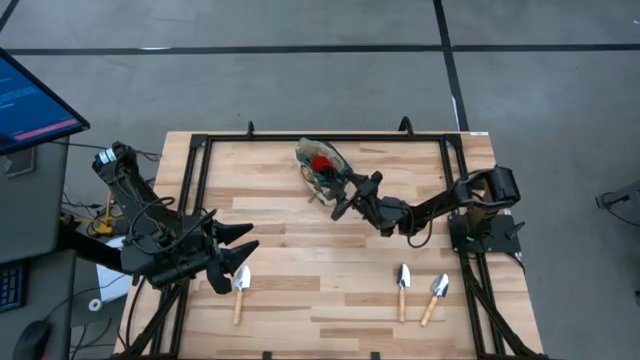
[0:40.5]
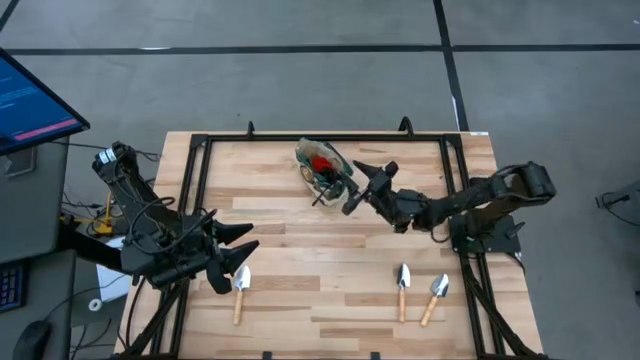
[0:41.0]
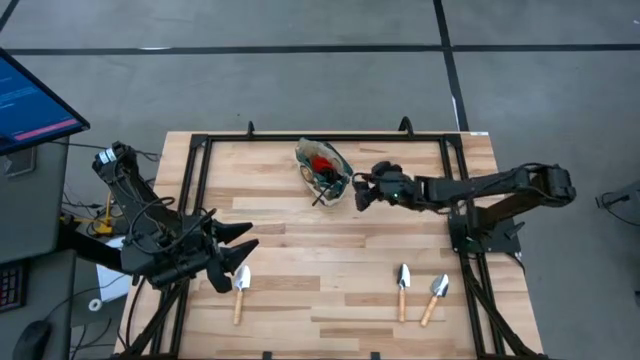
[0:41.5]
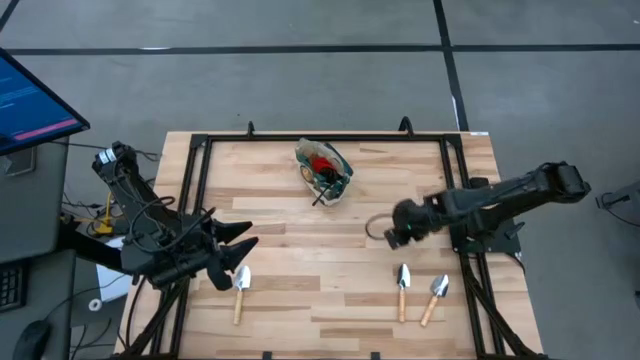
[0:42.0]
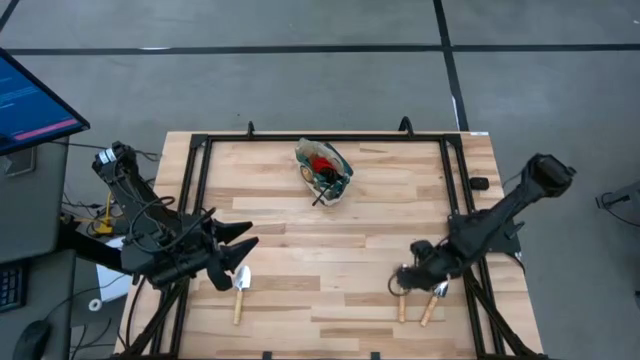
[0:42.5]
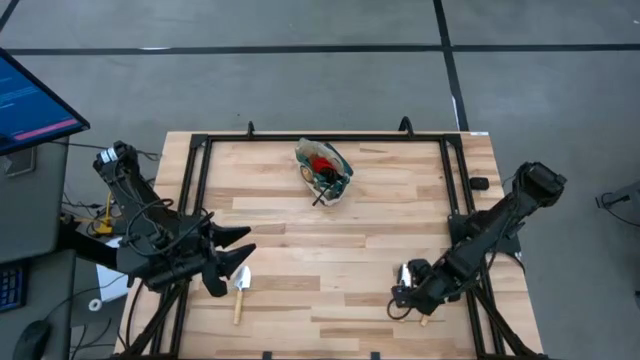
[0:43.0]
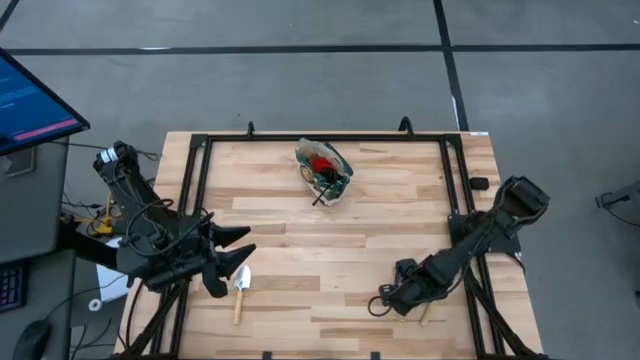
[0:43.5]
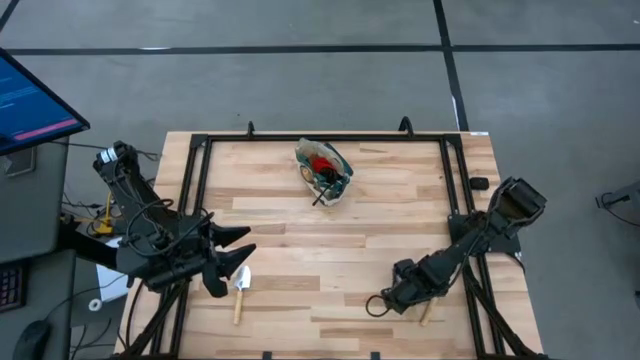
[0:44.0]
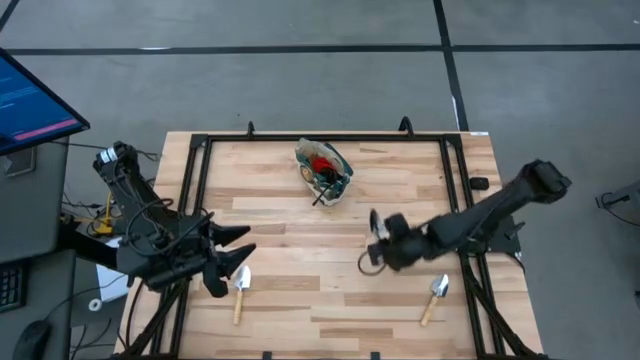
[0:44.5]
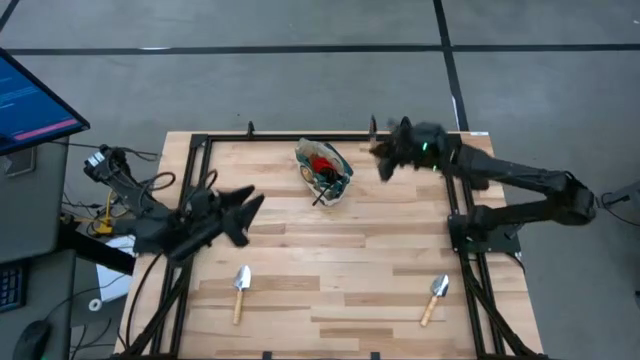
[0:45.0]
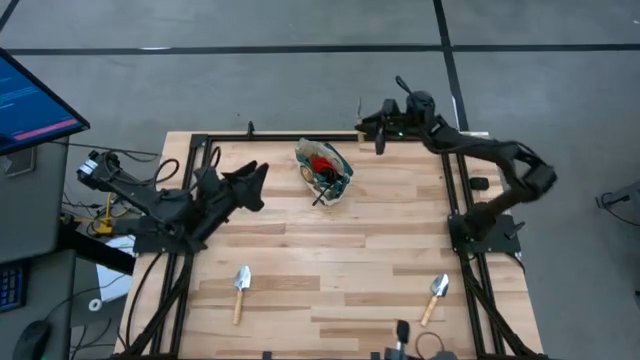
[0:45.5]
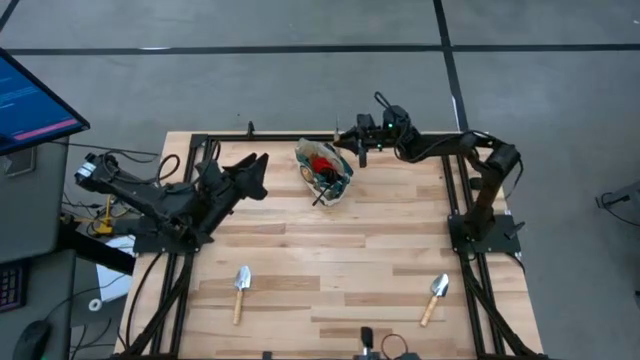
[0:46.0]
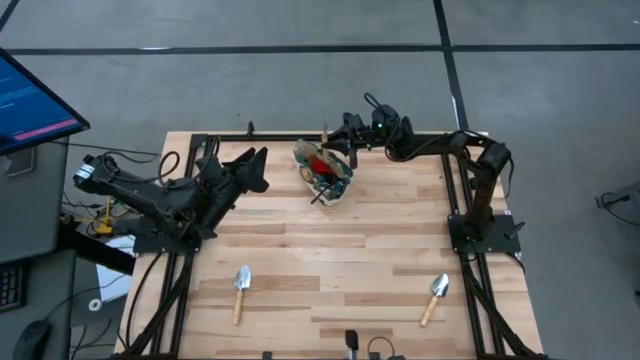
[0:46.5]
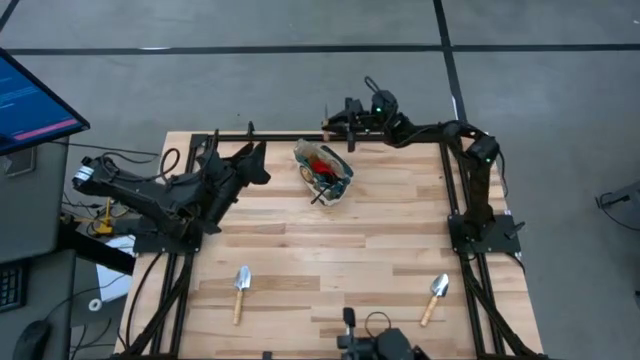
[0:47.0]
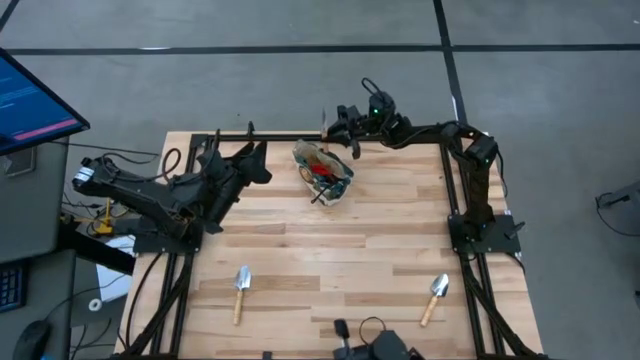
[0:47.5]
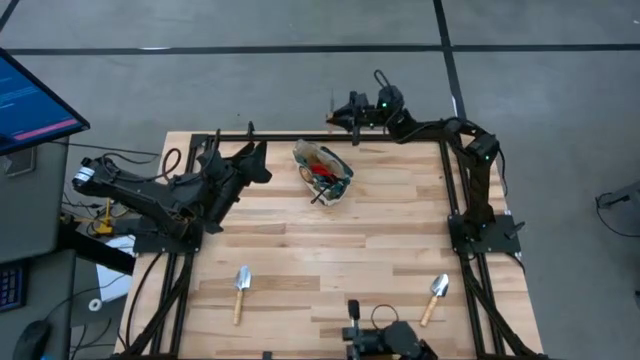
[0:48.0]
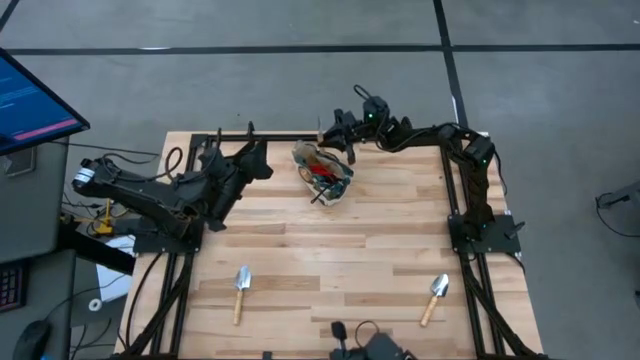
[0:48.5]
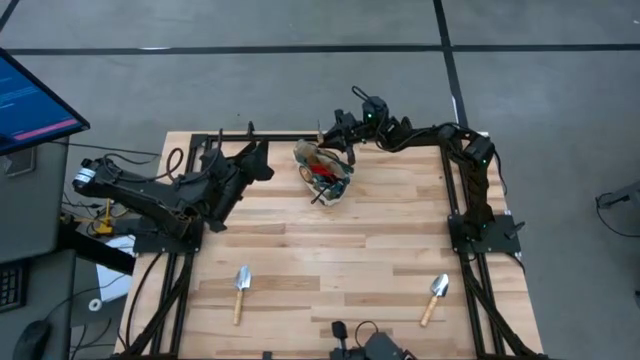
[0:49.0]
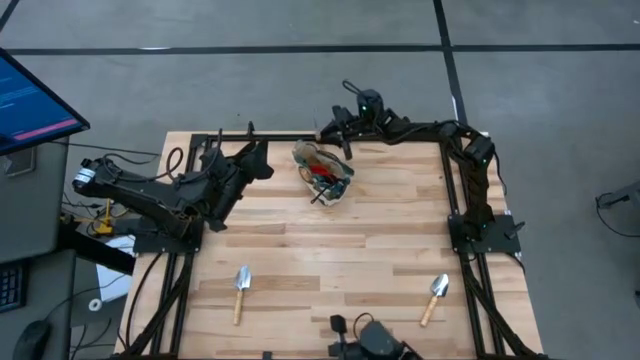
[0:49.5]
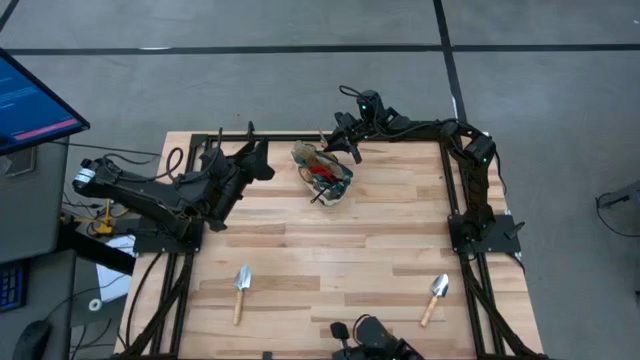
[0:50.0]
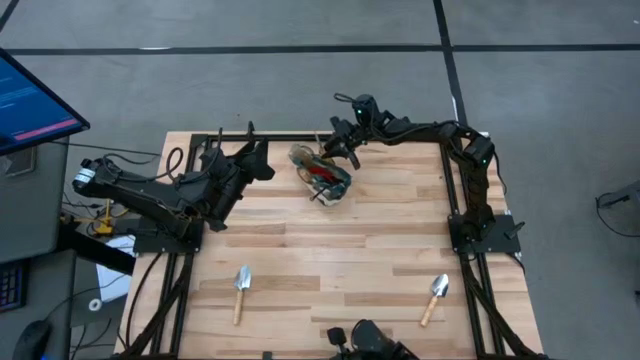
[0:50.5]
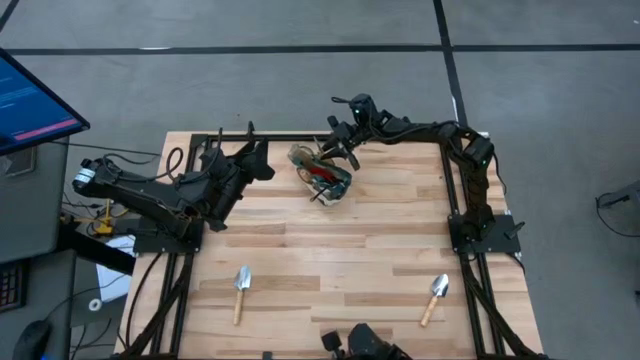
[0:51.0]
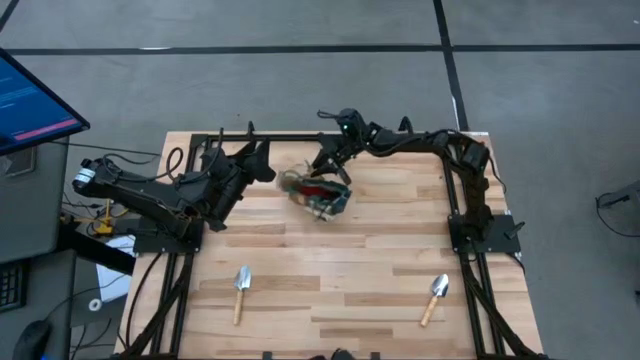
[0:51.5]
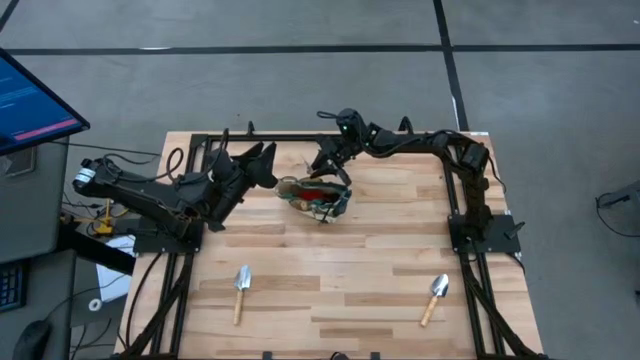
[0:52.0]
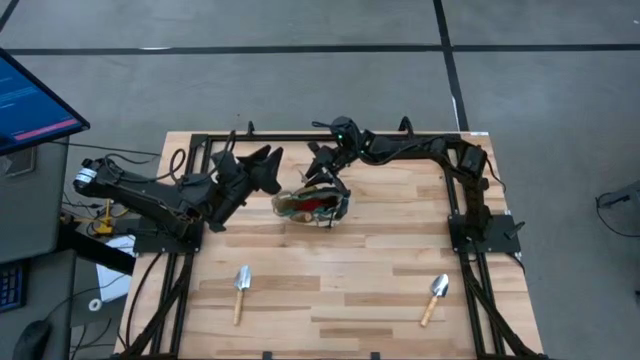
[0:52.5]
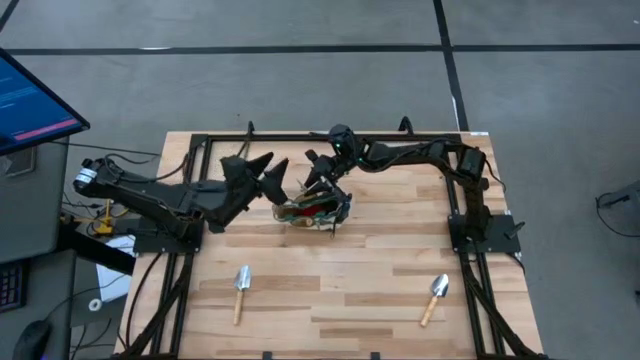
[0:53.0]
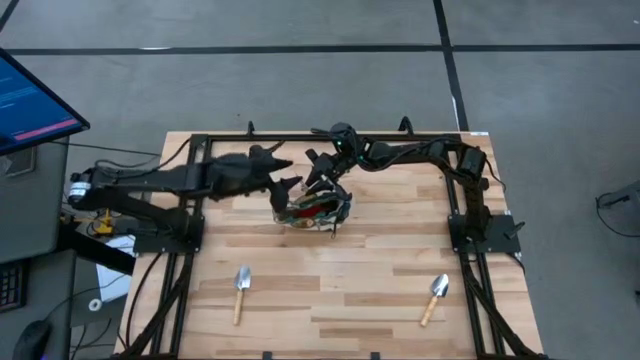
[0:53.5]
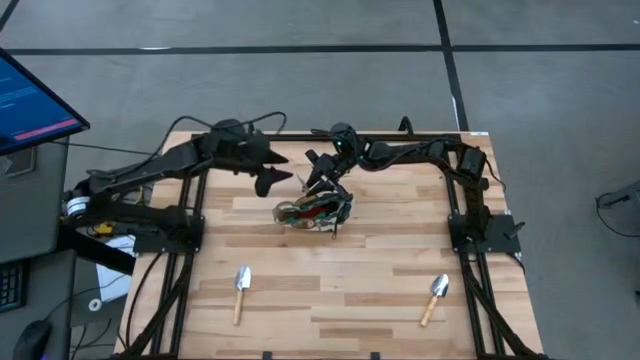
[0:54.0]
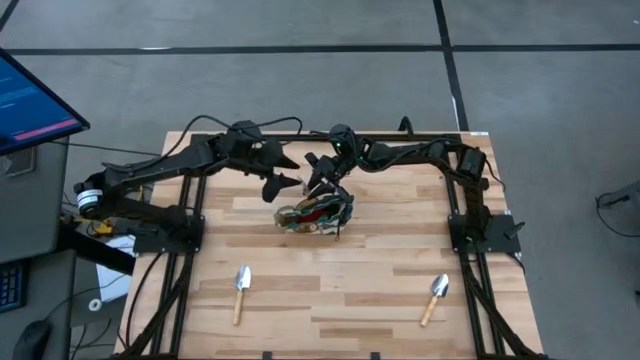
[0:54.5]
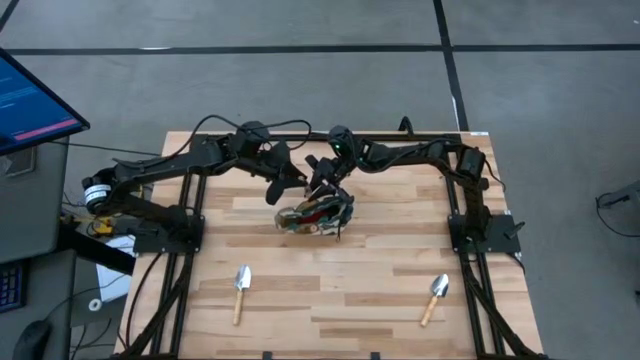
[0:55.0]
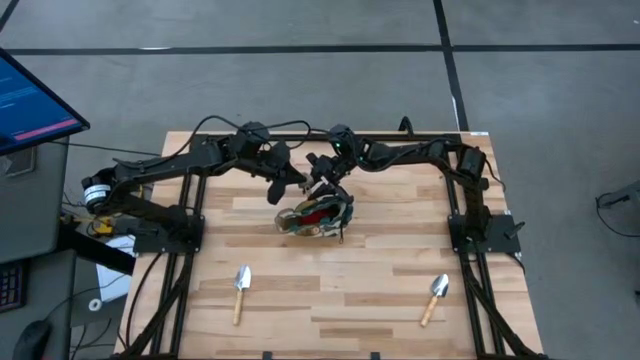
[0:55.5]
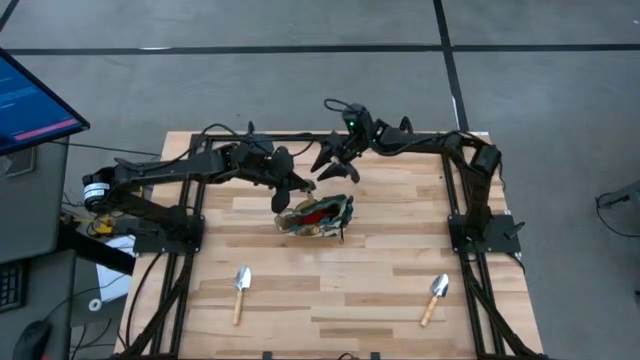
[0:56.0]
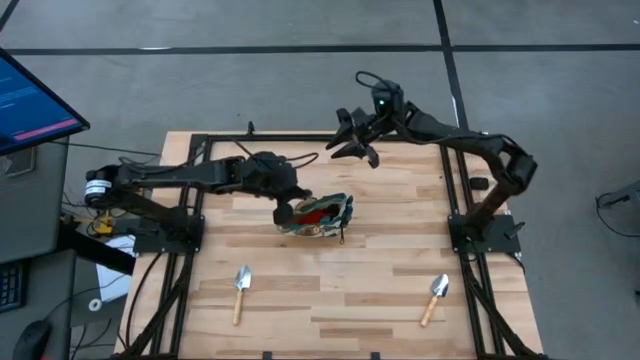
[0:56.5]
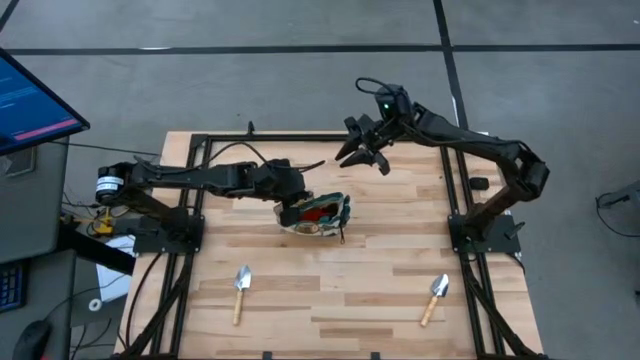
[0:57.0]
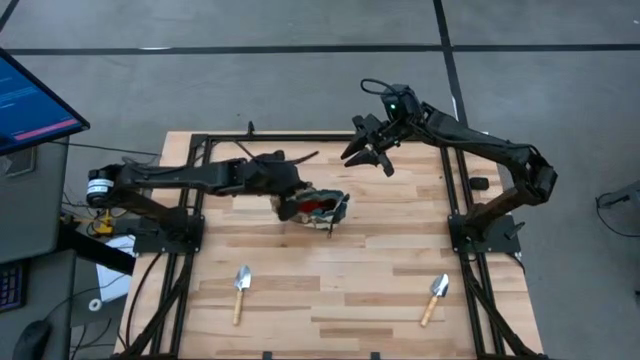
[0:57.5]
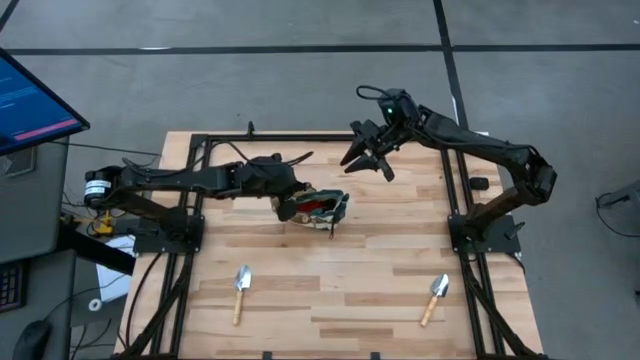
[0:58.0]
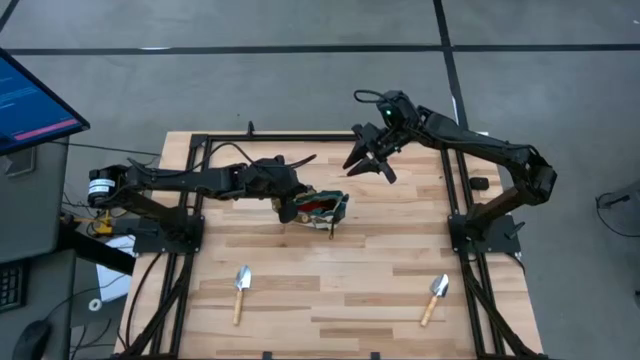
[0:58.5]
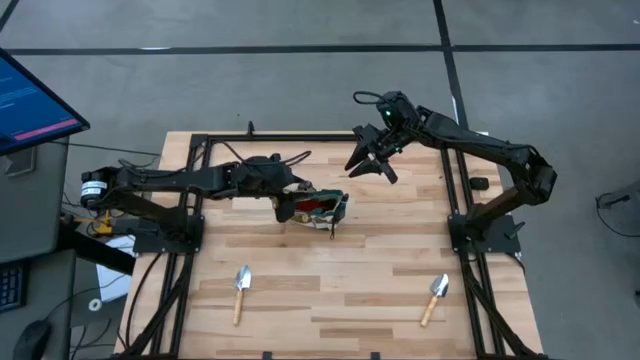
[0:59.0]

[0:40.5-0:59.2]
Task: Pick & Place Garden tools in Gardening bag
Put the brown trowel into the gardening bag

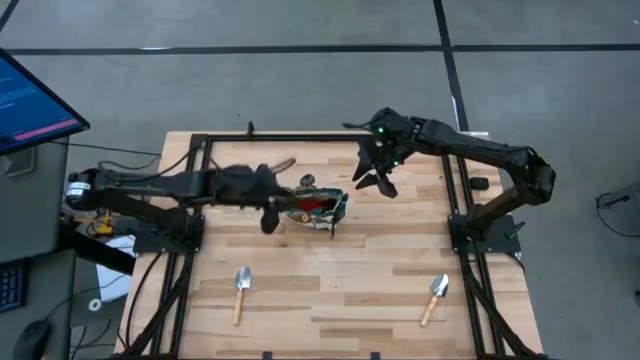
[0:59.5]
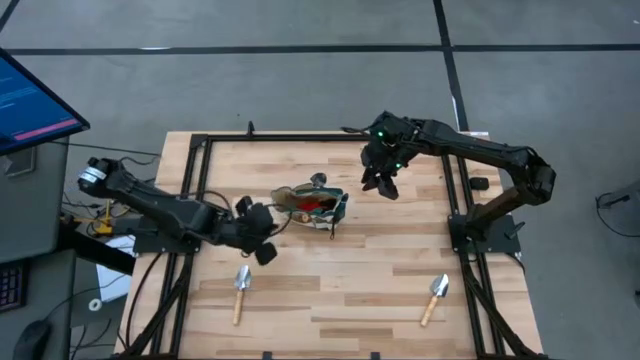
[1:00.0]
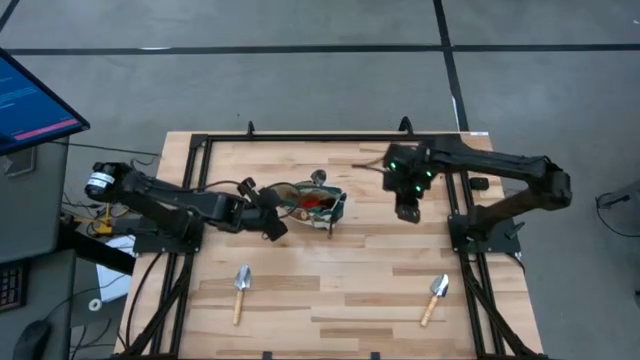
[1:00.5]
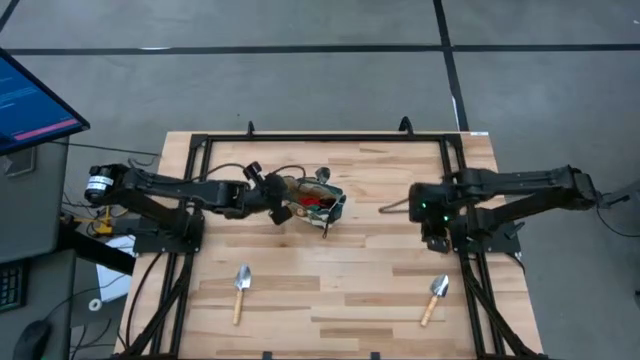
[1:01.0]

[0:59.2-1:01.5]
Adjust the gardening bag

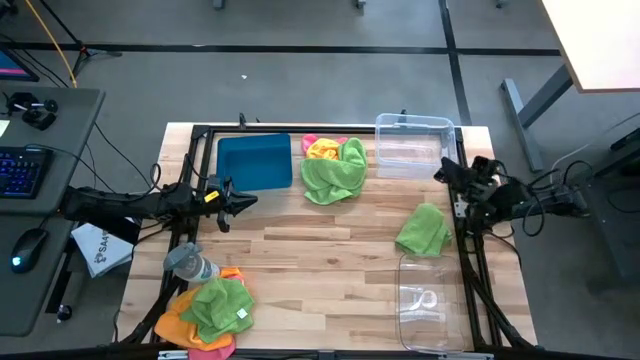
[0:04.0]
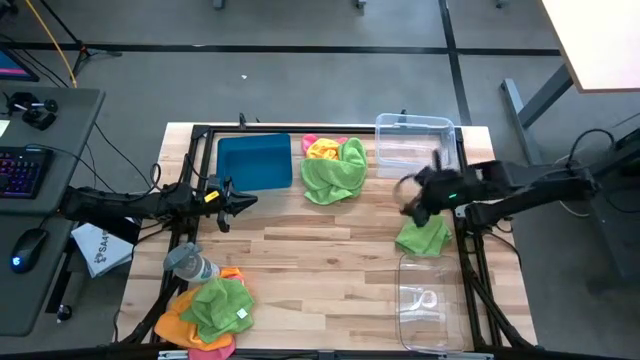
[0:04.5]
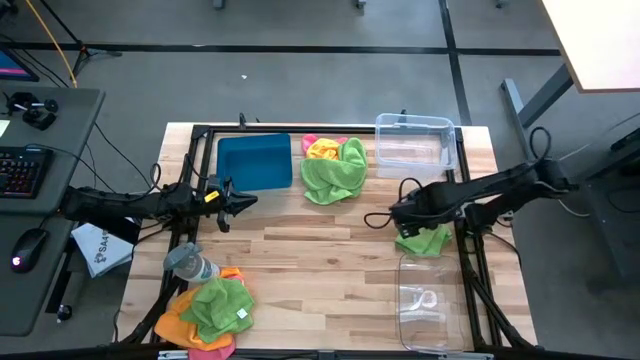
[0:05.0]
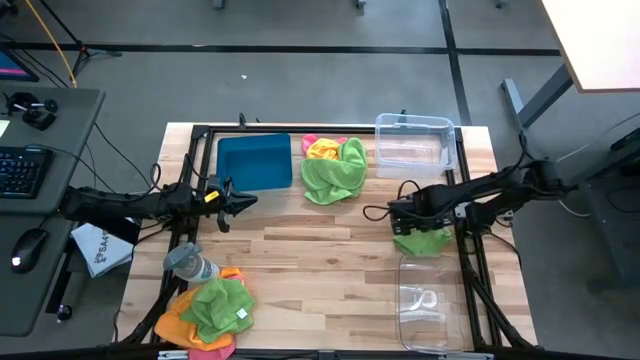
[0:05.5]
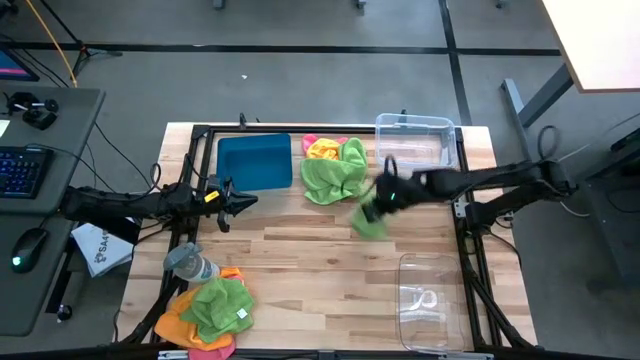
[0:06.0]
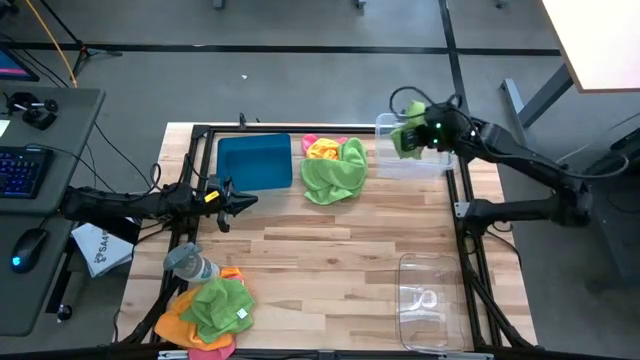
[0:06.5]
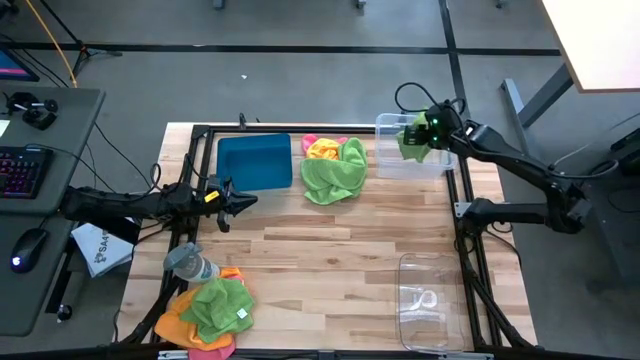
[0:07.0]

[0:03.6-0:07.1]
Task: Sort microfiber towel by color & place in baskets
Put the right green towel into the top transparent bin
